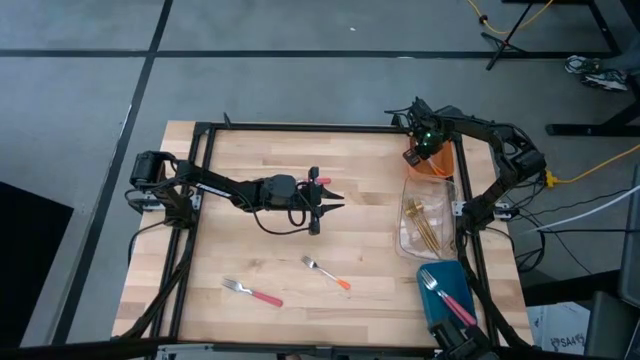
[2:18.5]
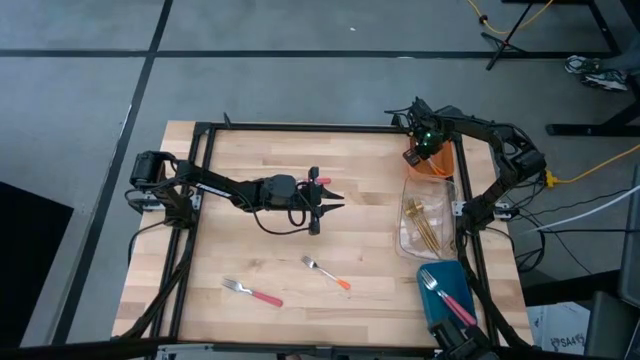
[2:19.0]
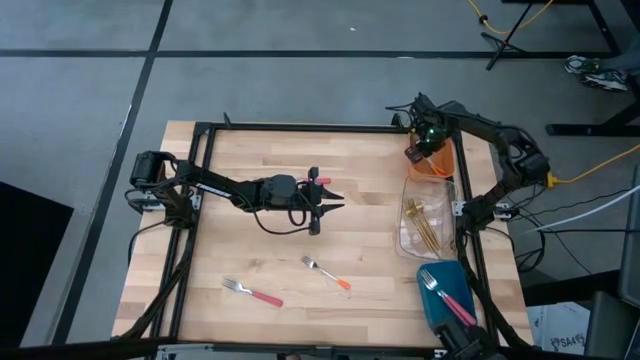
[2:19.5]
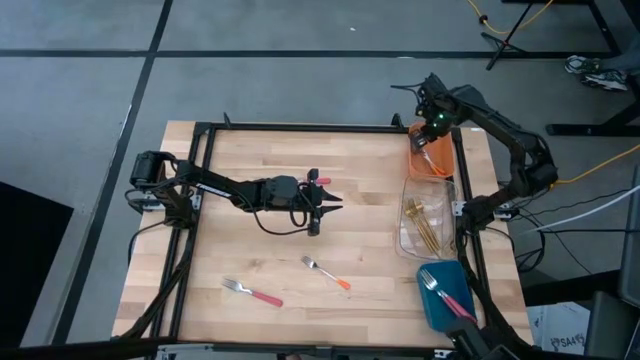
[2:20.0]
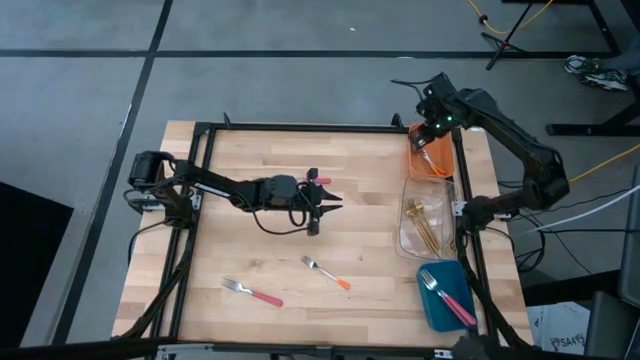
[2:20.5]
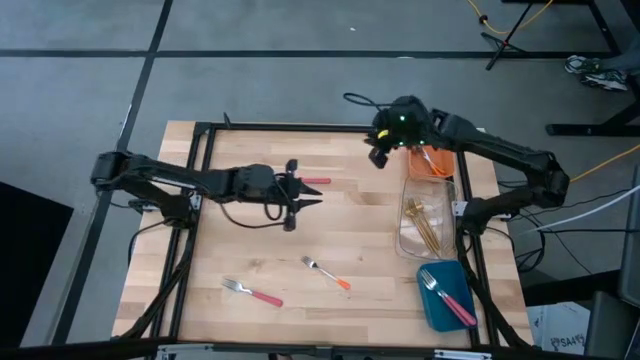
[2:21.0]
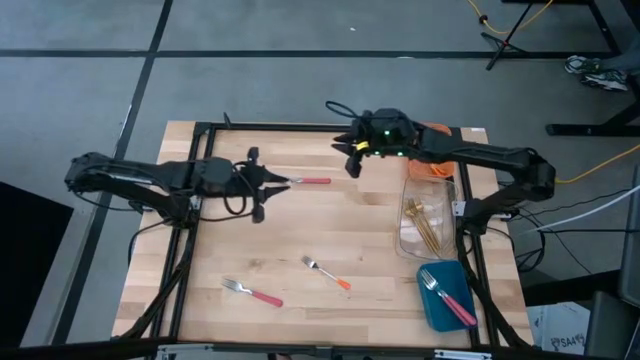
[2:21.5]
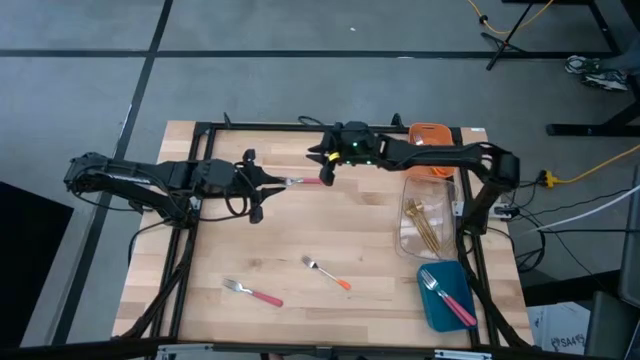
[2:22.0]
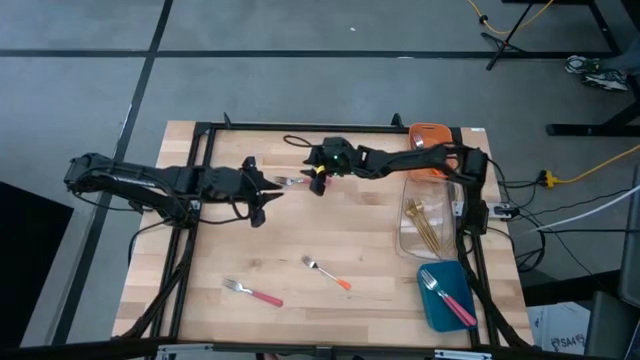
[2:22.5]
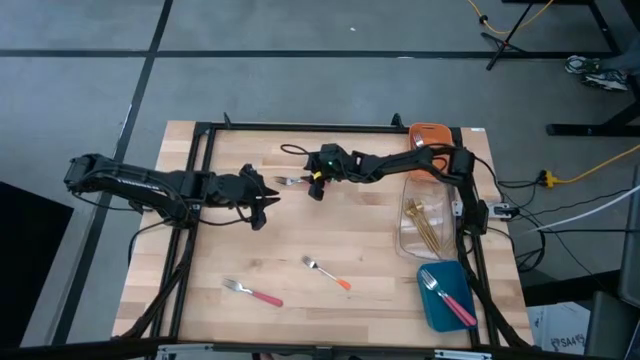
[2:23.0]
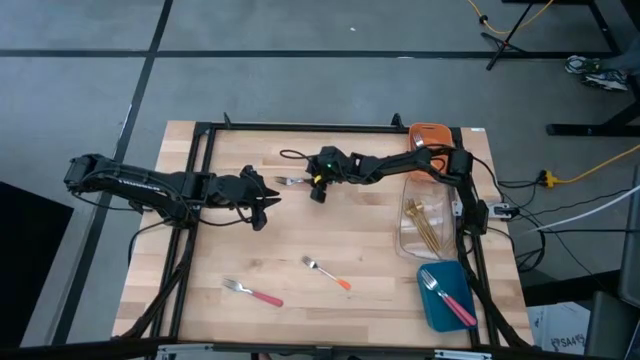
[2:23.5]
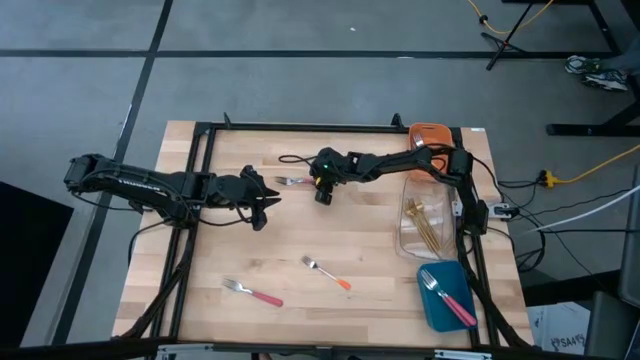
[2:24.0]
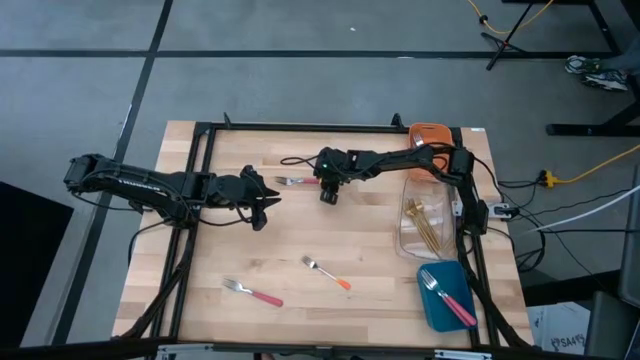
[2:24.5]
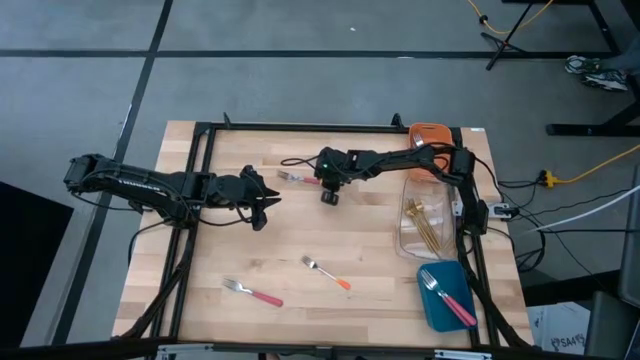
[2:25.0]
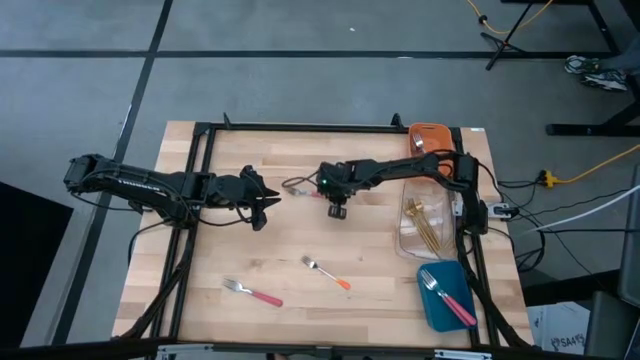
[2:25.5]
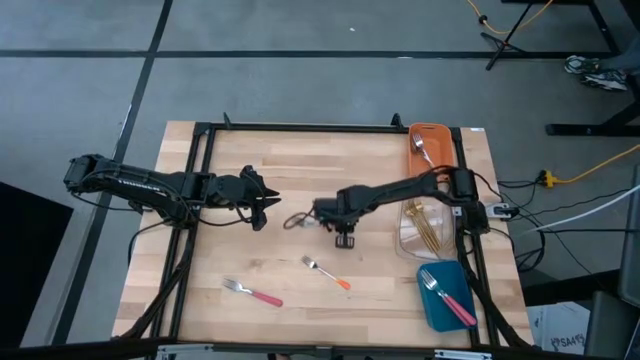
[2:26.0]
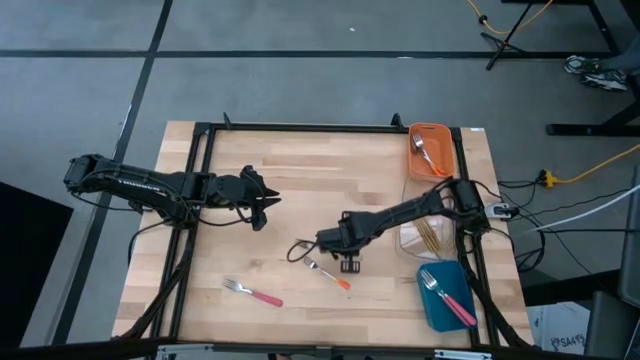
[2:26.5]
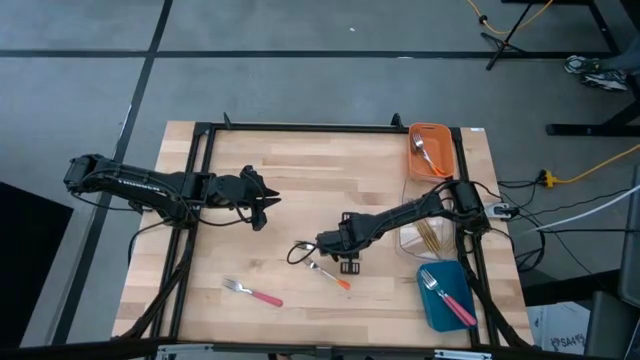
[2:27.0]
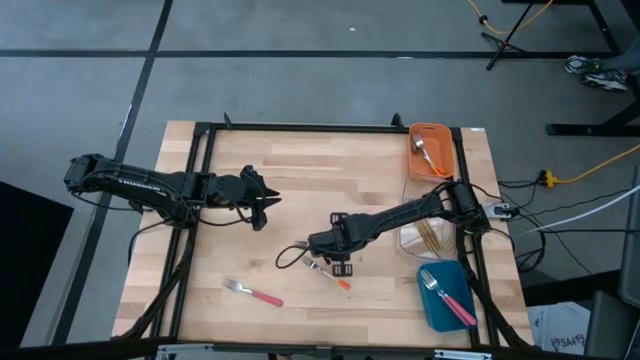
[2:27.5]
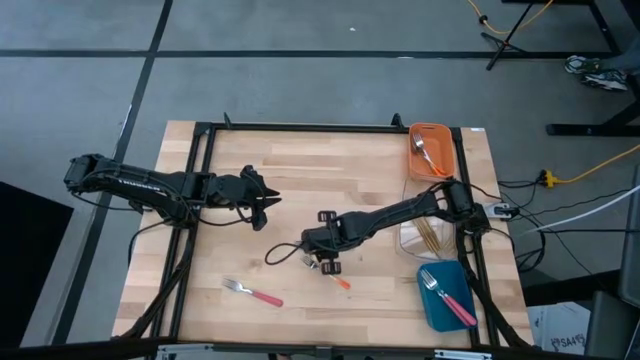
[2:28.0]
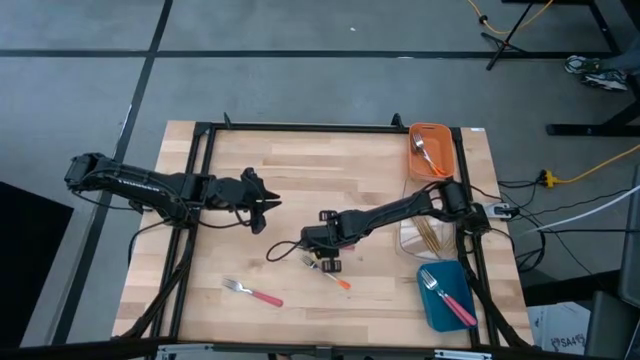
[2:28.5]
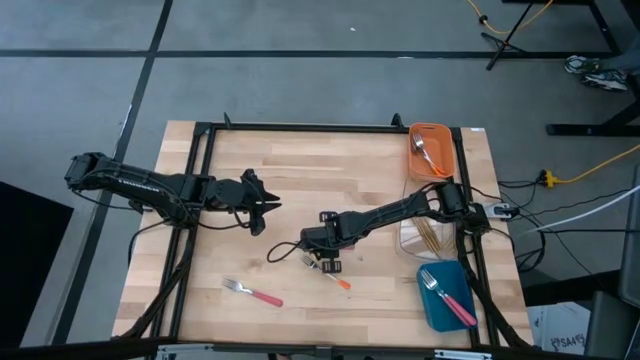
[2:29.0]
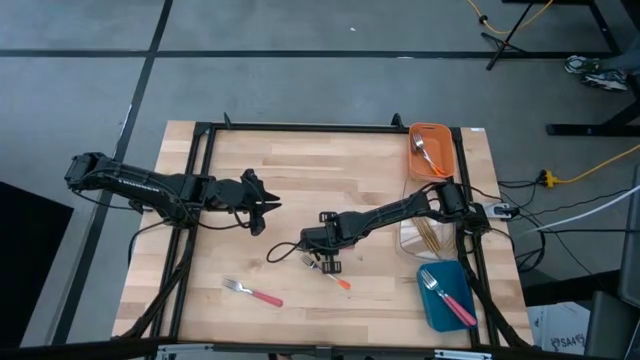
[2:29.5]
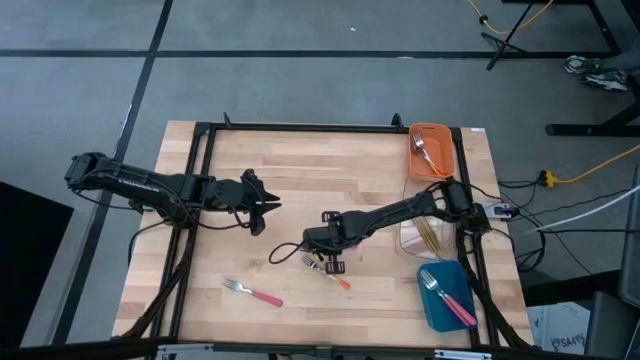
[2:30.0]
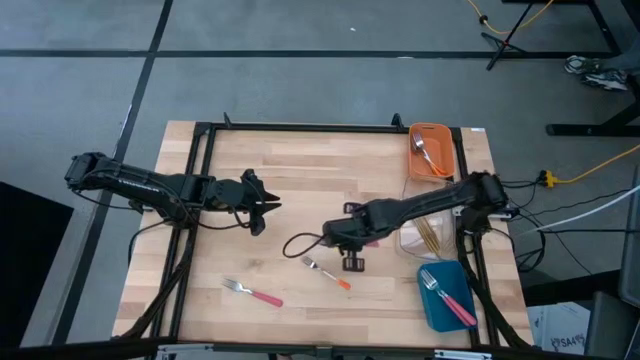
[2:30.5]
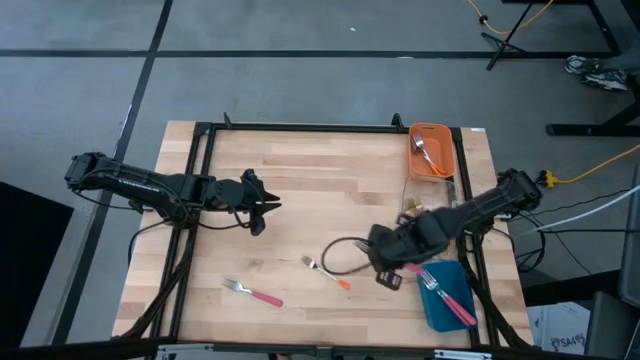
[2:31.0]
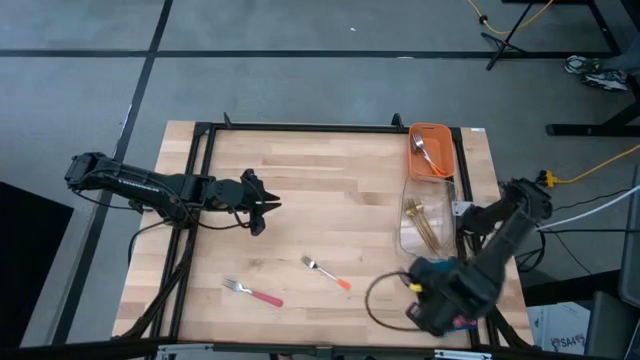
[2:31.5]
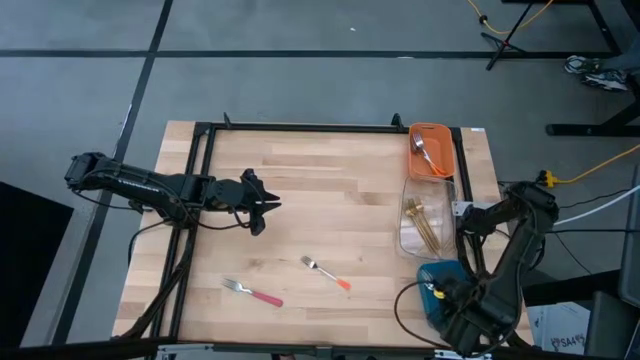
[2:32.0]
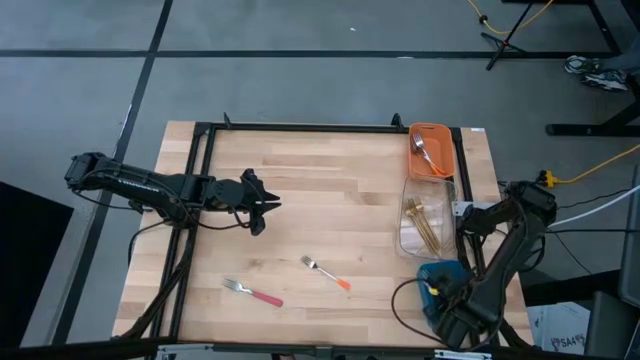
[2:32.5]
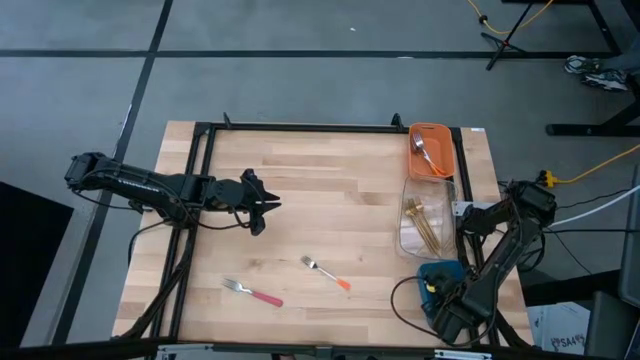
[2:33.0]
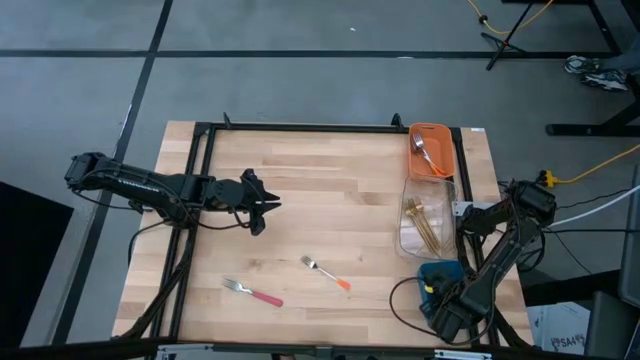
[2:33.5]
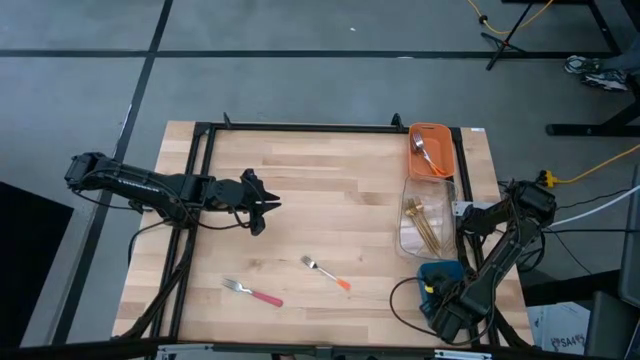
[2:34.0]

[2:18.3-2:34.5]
Task: Sort silverware by color (type)
Put the pink fork into the blue bin

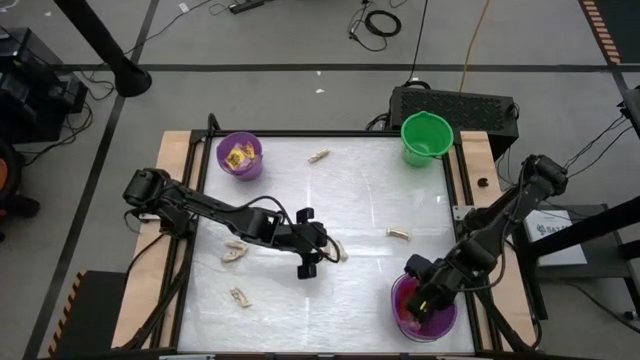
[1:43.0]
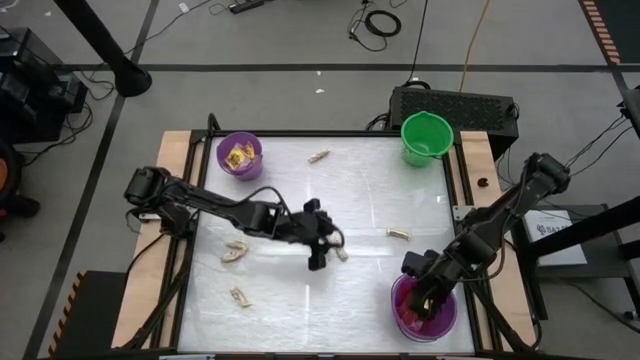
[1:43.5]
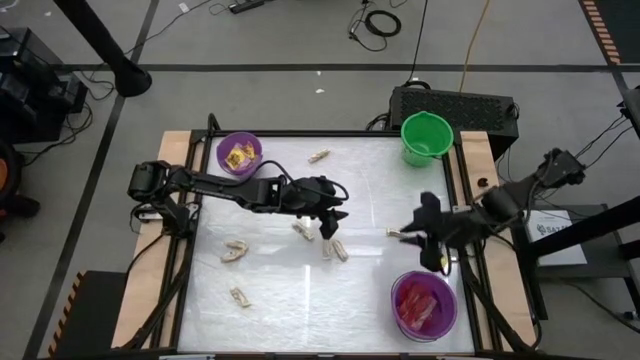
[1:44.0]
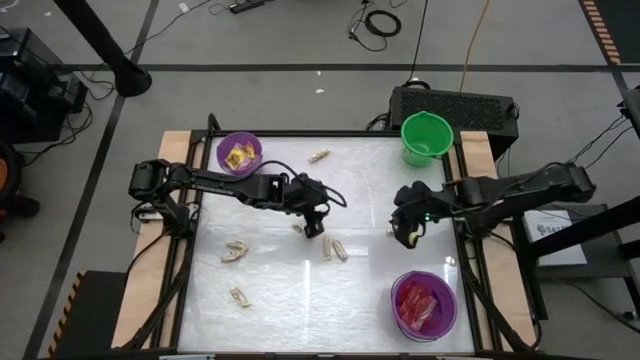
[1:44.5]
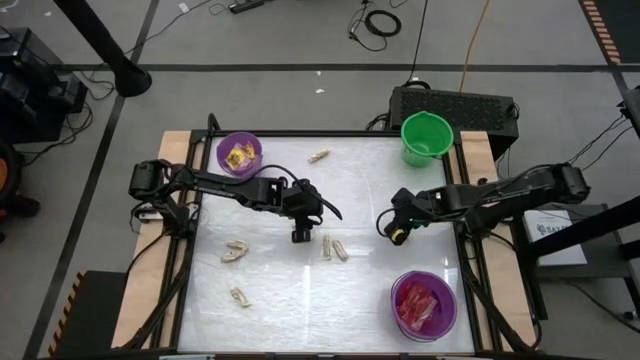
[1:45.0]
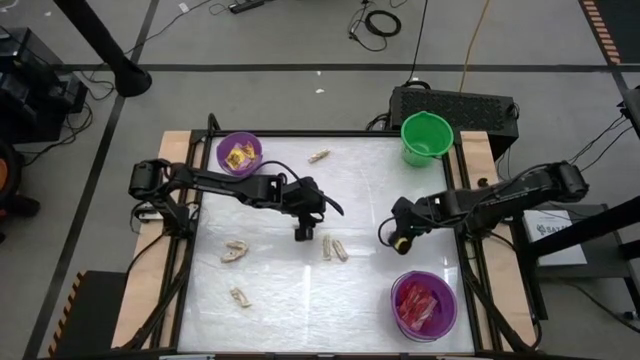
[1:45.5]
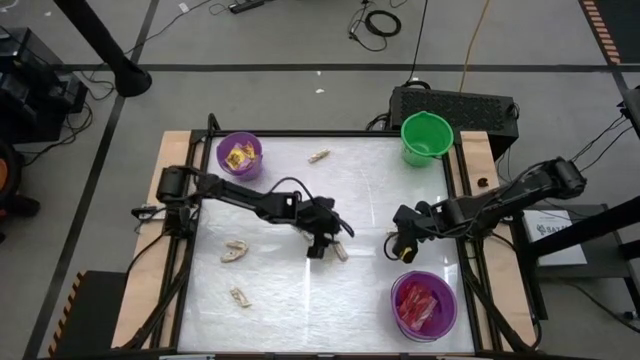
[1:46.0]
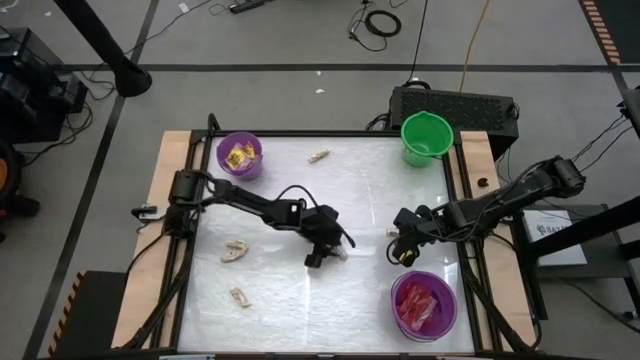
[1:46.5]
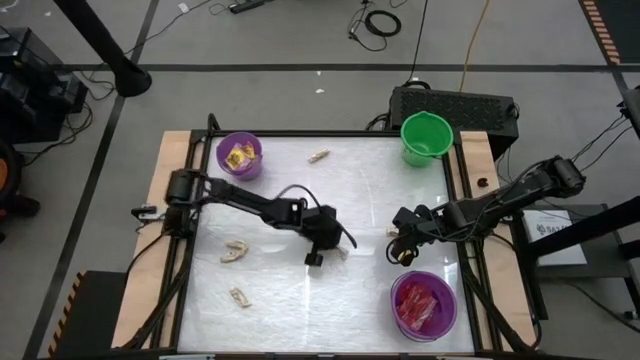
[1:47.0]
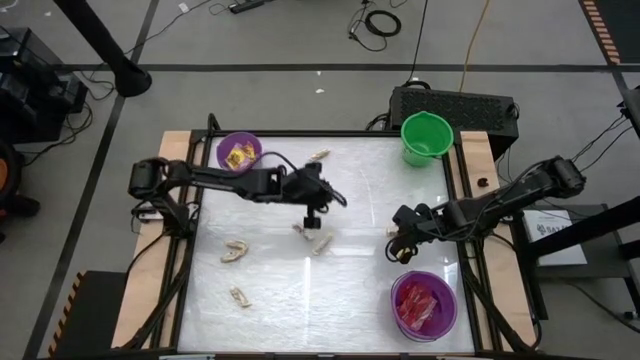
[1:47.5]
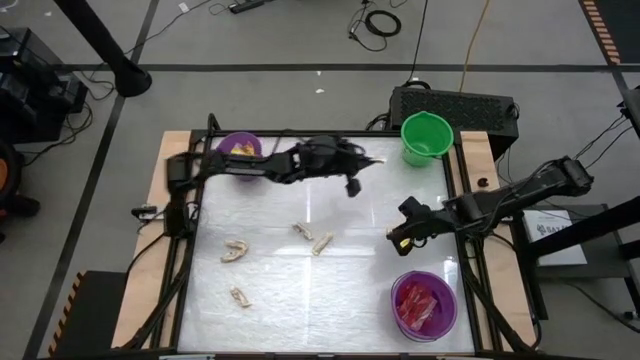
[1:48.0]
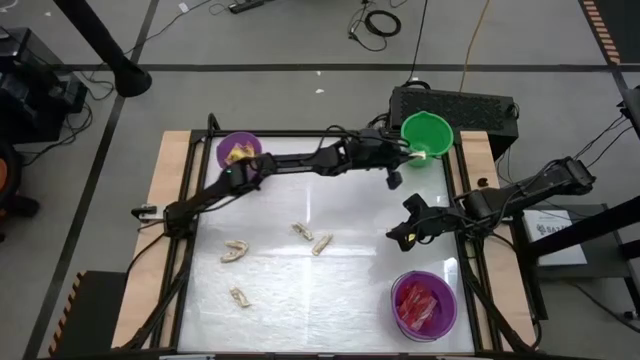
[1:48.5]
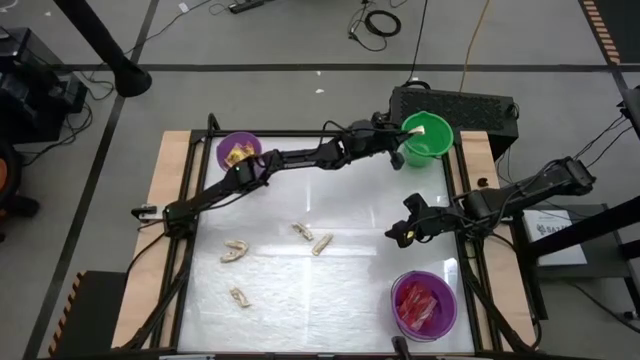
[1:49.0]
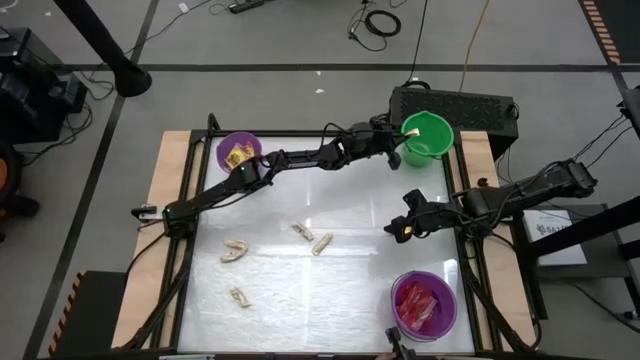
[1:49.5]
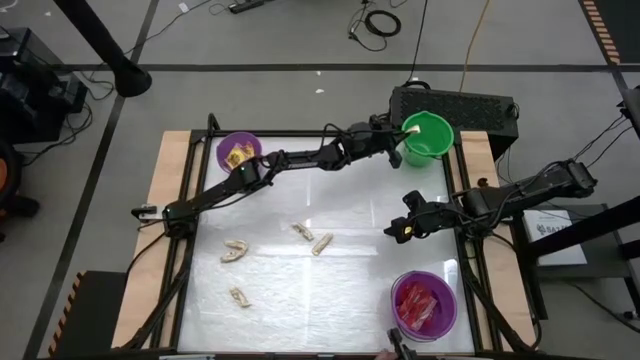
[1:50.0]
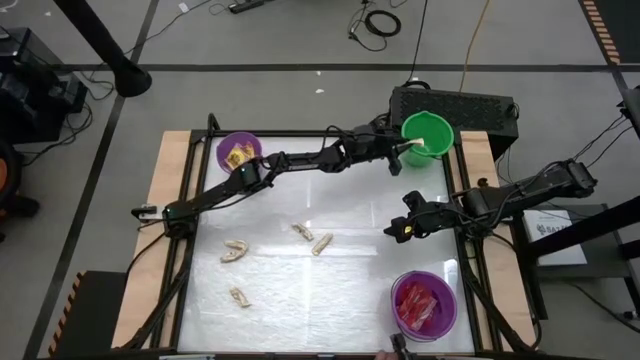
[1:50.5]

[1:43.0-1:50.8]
Task: Sort candy by brand, put in halloween buckets
Put the white candy into the green bucket
